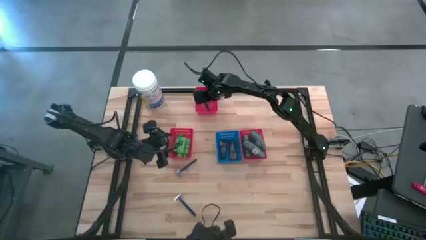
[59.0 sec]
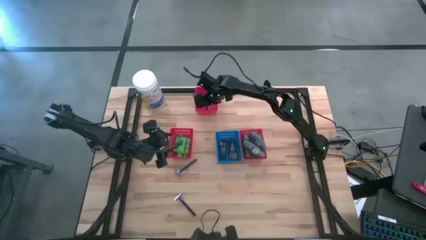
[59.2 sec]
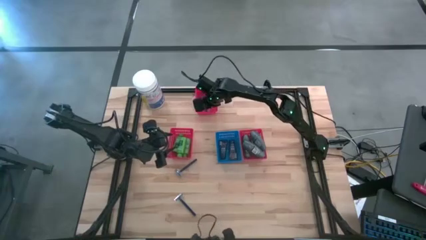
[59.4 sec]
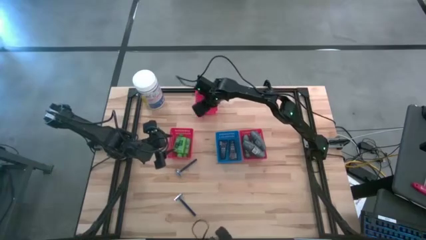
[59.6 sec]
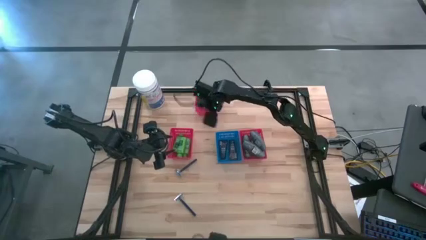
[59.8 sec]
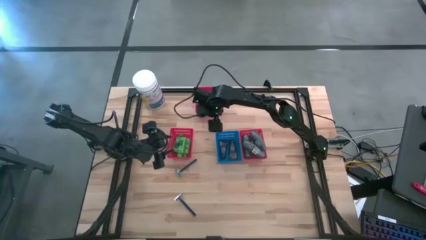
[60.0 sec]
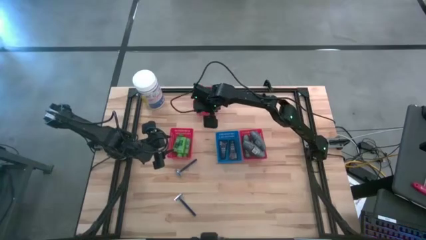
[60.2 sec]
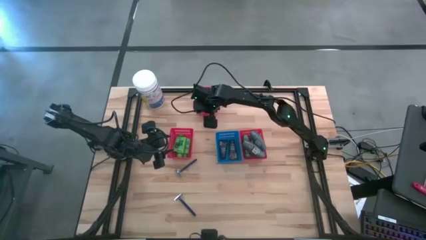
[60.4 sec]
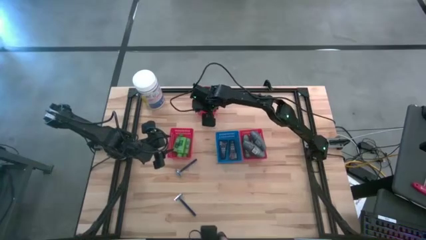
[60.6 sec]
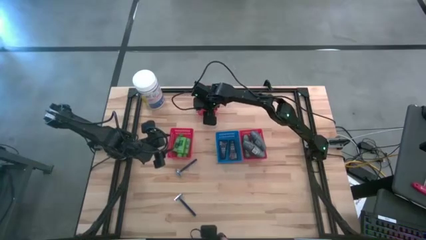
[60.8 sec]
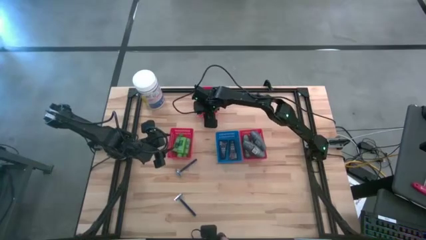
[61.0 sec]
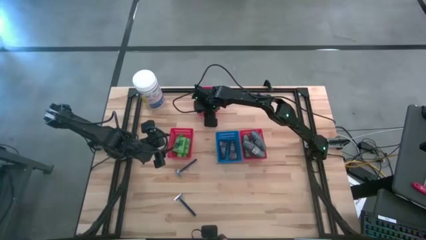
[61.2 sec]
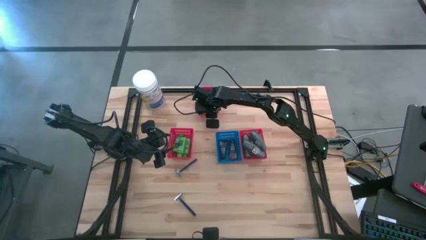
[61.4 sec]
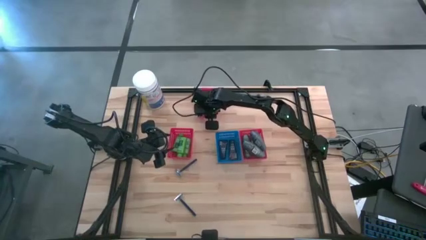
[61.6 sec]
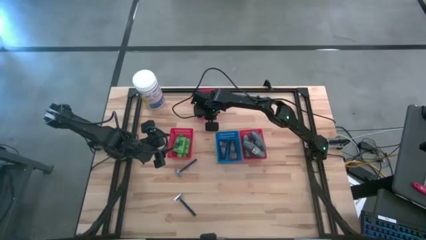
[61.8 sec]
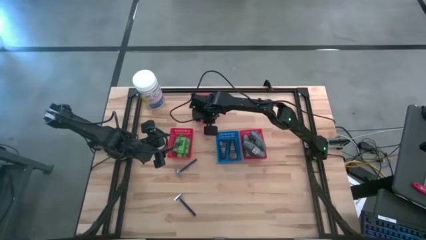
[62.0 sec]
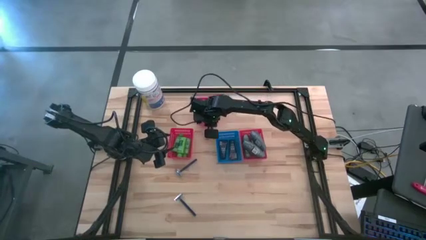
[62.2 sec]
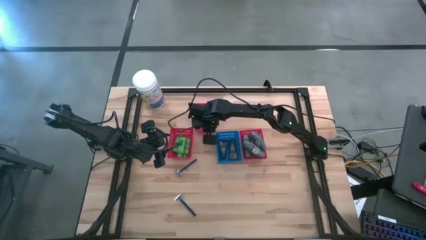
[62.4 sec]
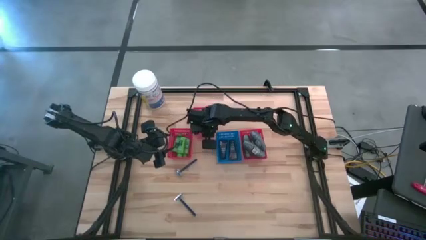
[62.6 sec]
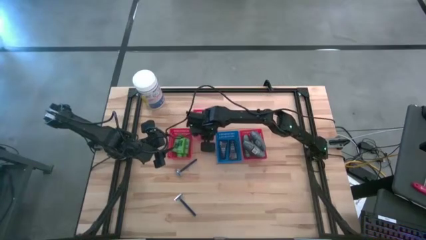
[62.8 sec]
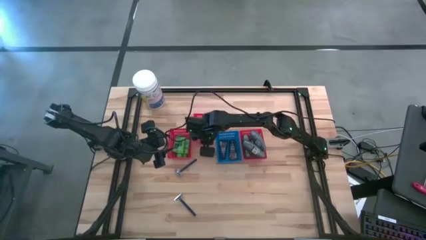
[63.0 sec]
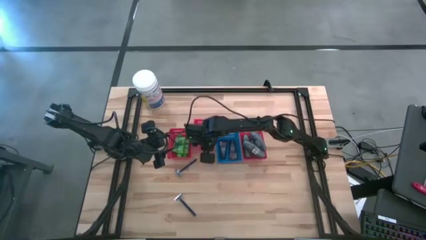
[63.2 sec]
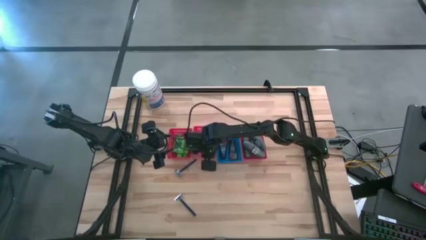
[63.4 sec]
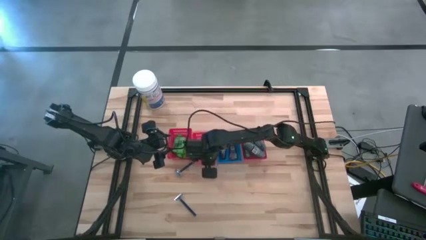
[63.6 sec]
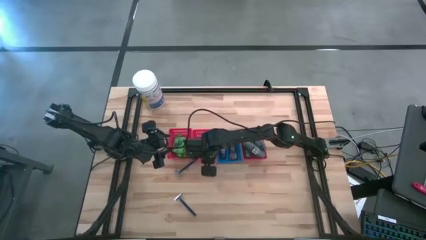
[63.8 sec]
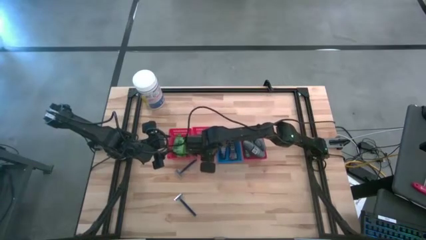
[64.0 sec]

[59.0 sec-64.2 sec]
Task: Pick & Place Travel size toiletries
Move the top red bin to the middle of the table

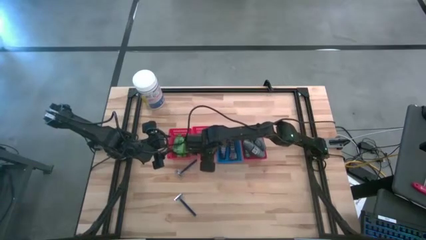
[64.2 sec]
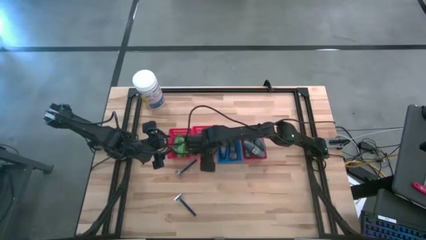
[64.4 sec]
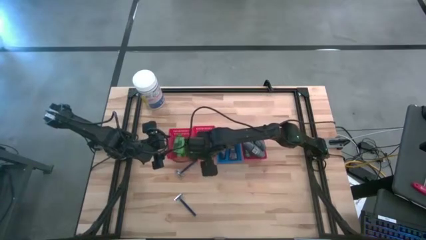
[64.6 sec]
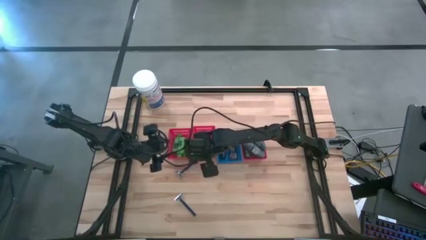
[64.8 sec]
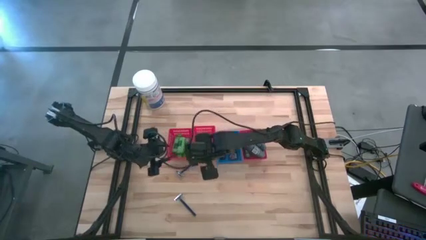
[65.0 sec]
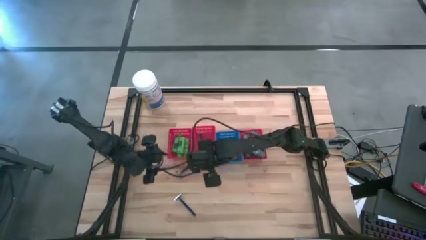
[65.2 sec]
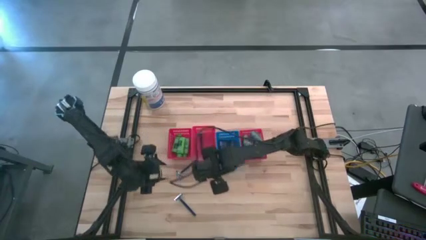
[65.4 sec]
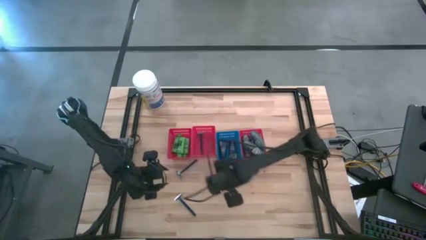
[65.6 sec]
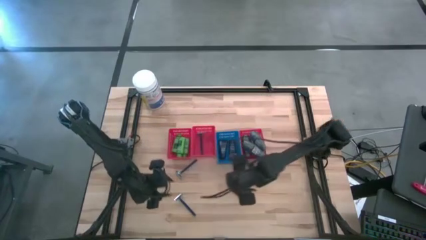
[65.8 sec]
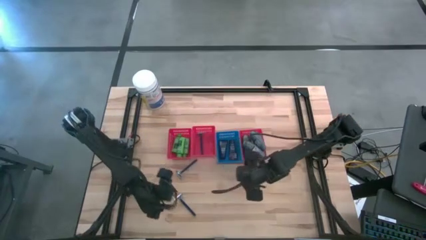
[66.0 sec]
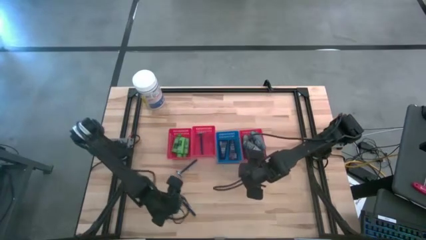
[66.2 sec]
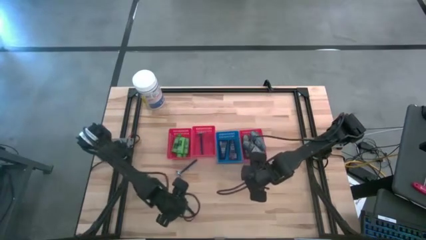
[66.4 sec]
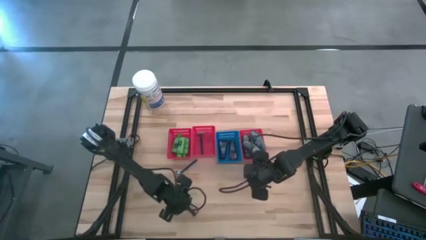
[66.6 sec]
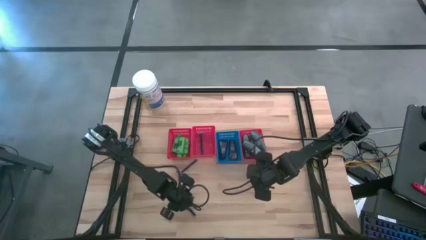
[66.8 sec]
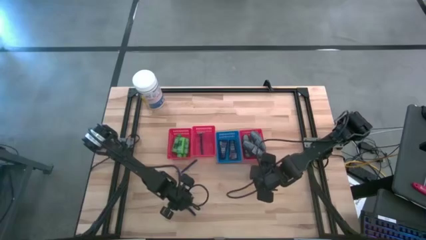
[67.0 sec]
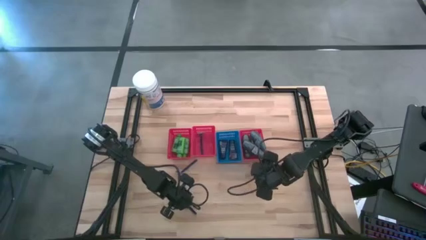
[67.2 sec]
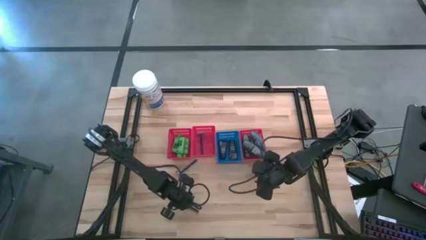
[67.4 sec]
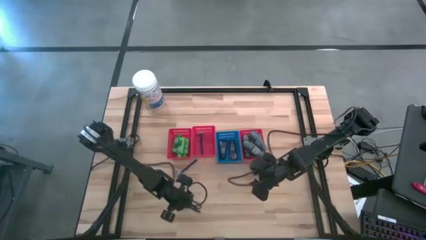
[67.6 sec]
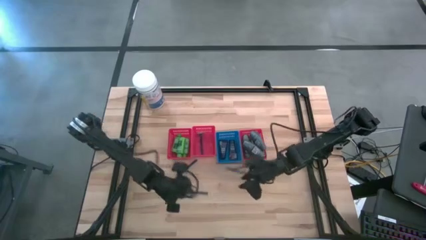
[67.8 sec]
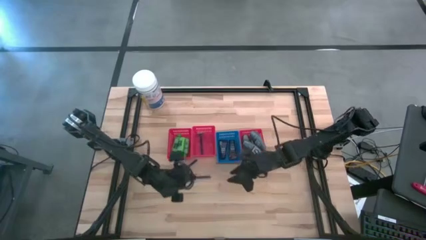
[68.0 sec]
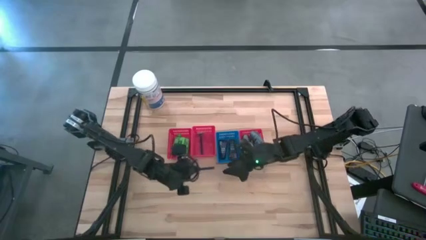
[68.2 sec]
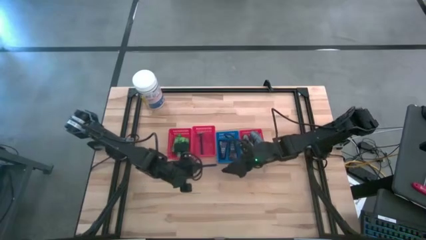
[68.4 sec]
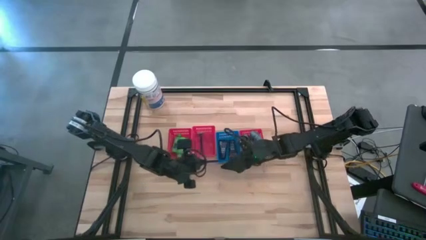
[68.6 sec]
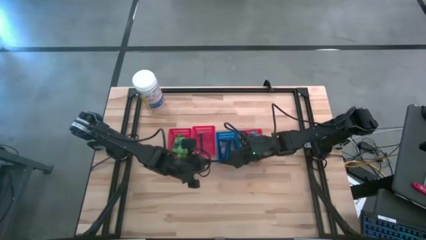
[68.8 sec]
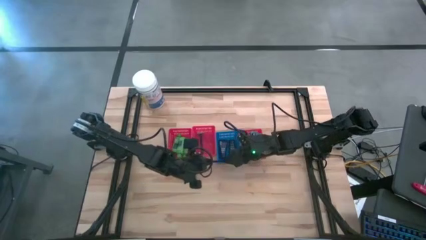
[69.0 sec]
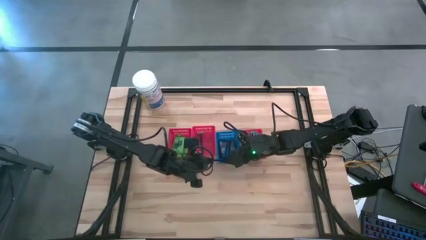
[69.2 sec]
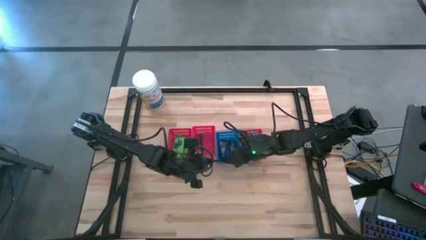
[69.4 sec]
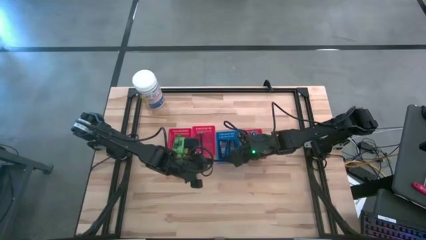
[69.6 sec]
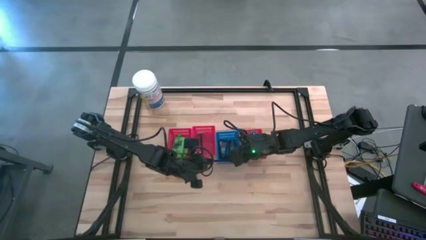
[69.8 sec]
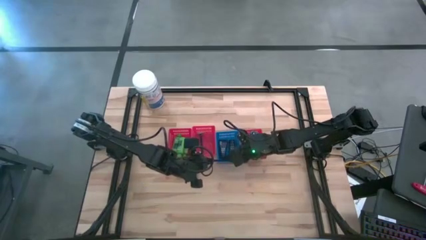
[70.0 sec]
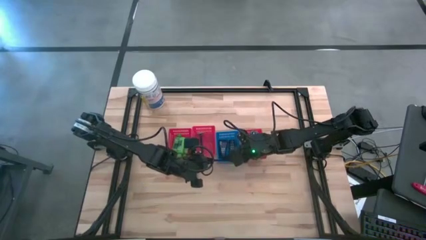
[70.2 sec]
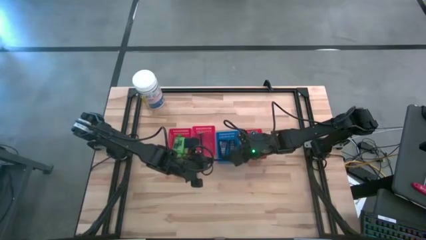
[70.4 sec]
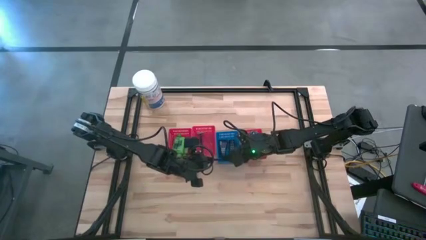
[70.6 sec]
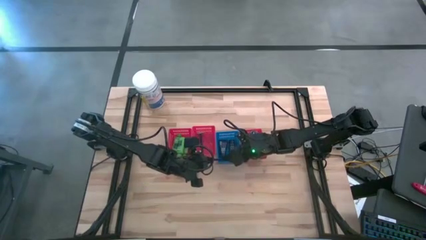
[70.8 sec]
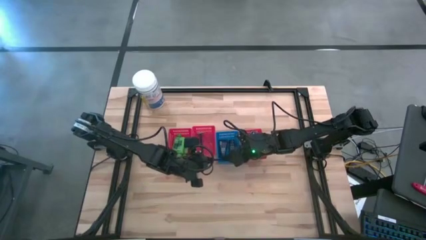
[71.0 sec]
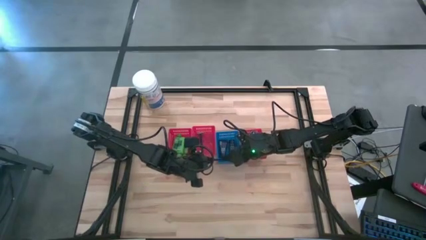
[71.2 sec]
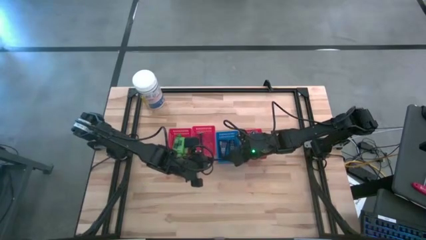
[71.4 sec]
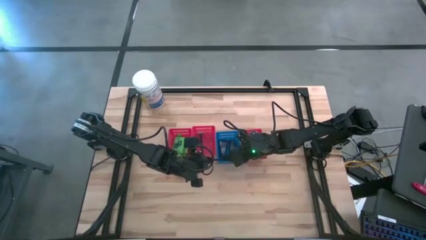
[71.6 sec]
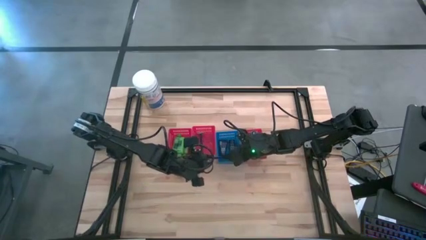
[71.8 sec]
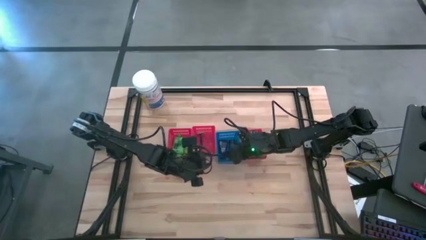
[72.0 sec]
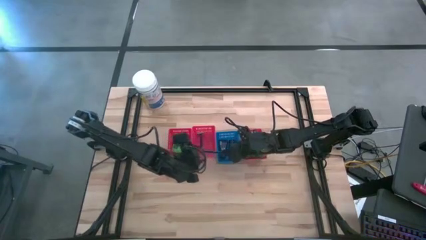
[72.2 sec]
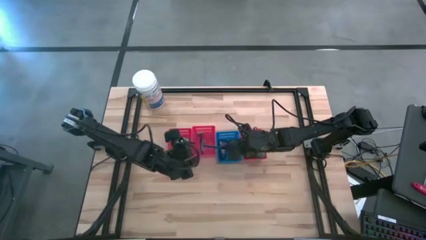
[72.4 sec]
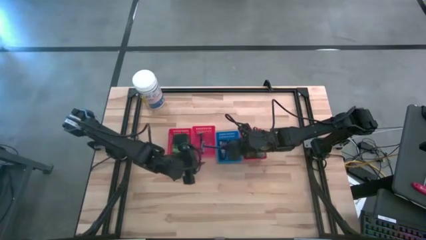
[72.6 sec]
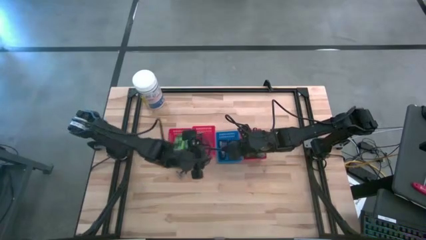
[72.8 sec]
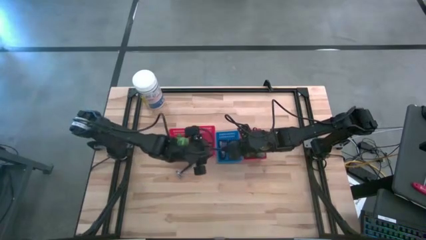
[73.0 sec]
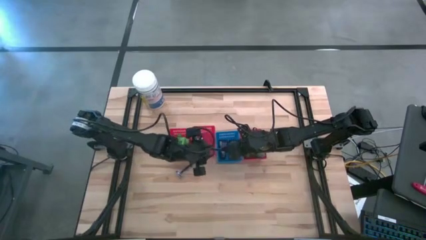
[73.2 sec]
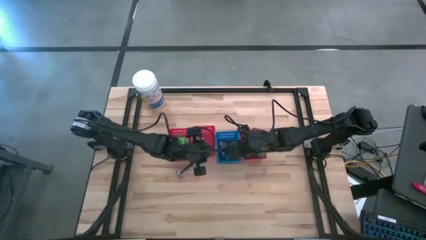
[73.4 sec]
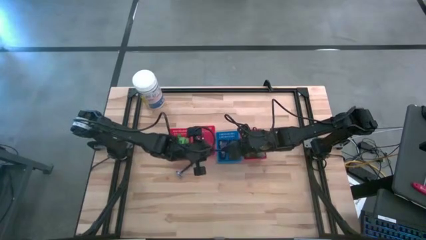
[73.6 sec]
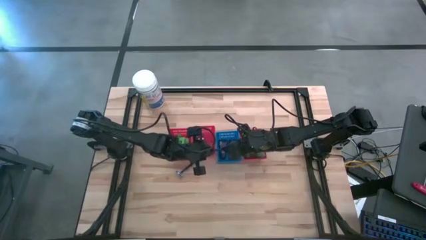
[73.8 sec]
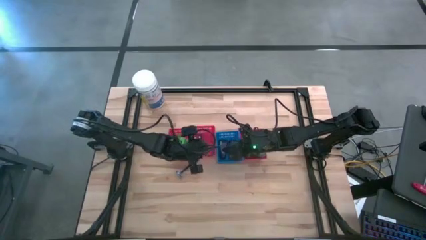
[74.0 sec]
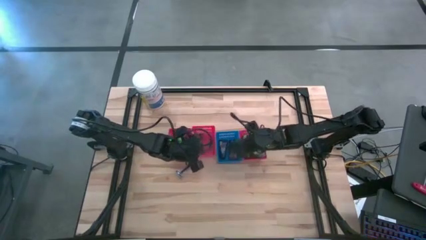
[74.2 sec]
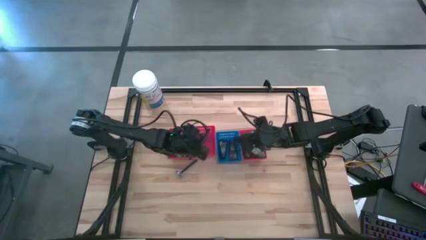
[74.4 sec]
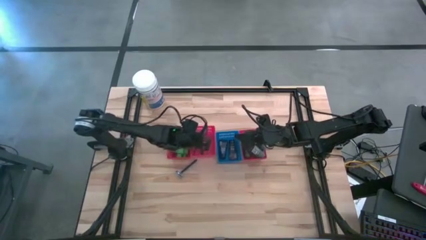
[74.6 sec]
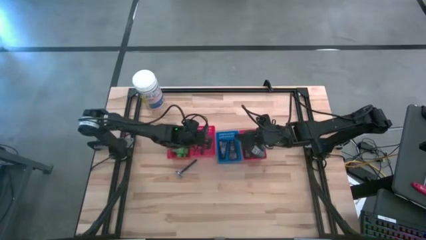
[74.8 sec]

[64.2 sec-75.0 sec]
Put the blue razor into the middle red bin

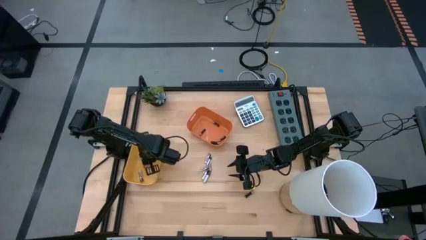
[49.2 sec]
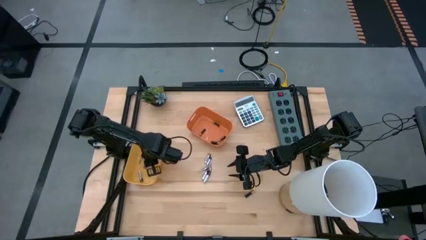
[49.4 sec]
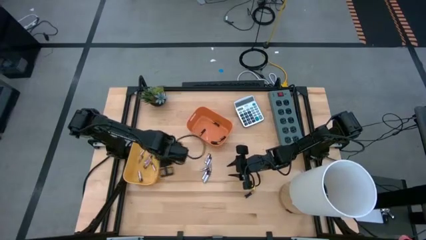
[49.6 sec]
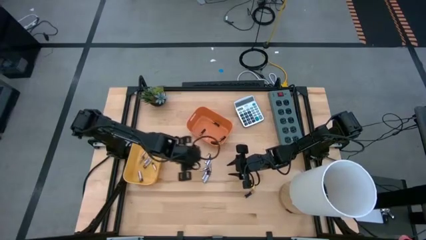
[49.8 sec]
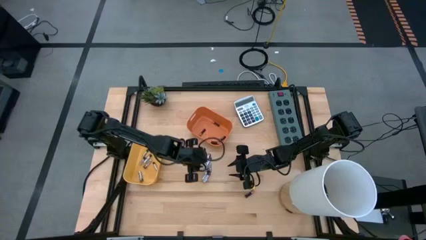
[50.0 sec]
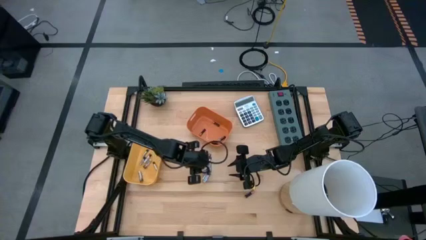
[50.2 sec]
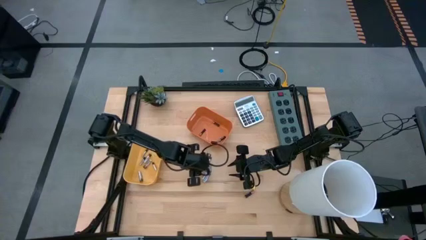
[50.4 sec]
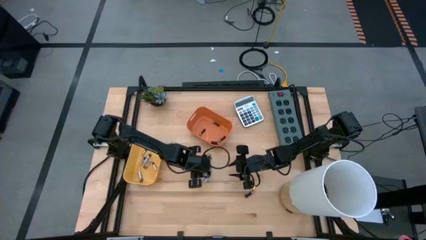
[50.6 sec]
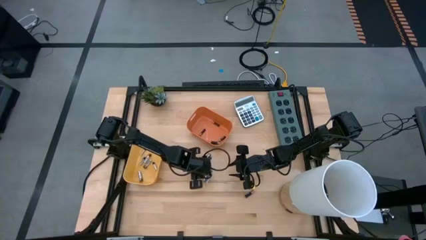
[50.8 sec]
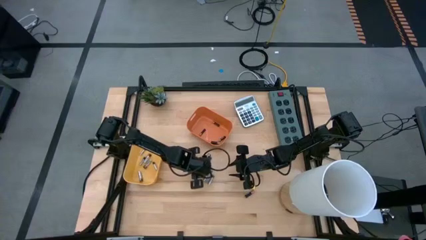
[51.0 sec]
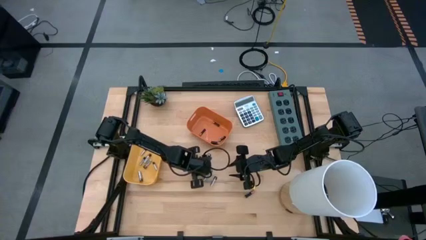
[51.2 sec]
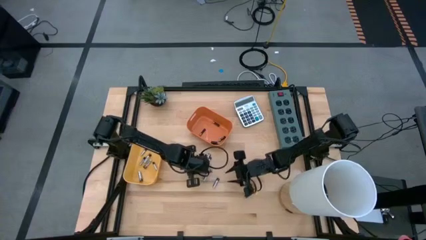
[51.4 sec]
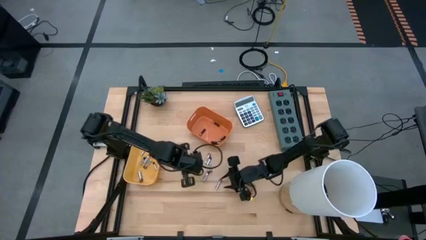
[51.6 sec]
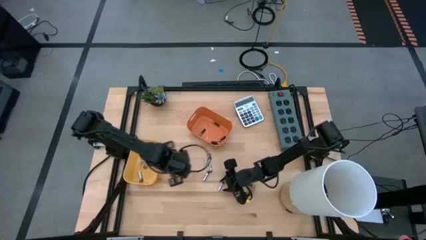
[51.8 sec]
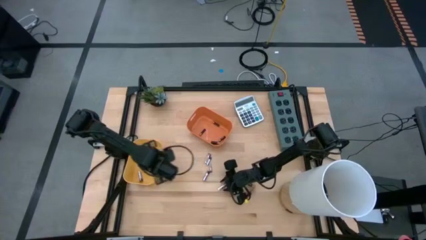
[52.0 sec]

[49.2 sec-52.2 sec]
Task: Sort batteries
Put the silver battery into the yellow bin
